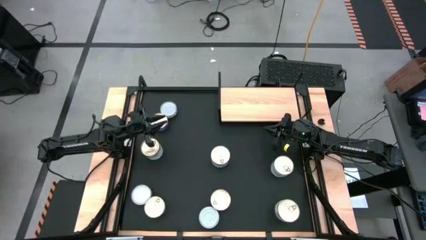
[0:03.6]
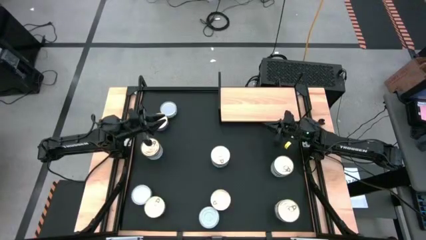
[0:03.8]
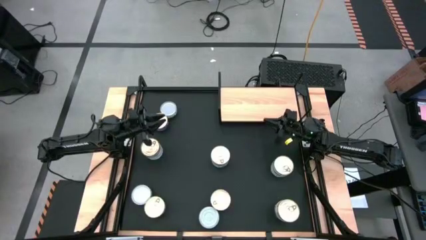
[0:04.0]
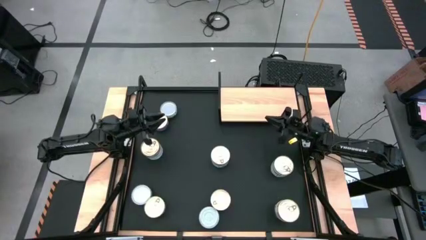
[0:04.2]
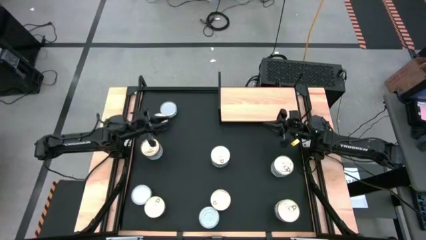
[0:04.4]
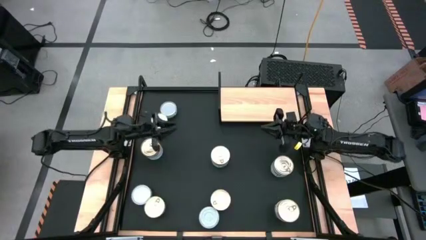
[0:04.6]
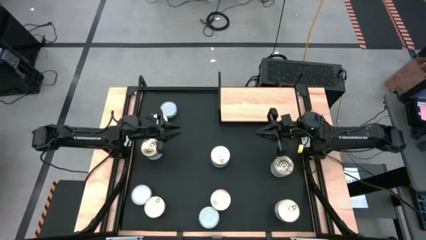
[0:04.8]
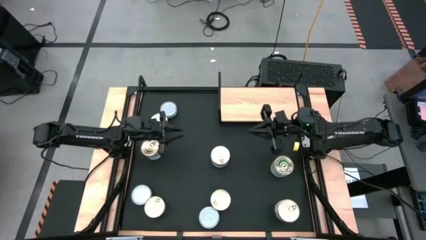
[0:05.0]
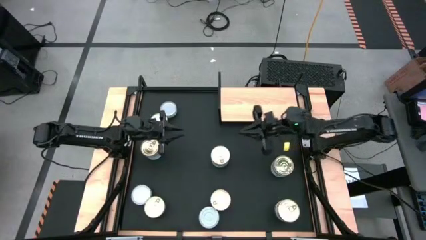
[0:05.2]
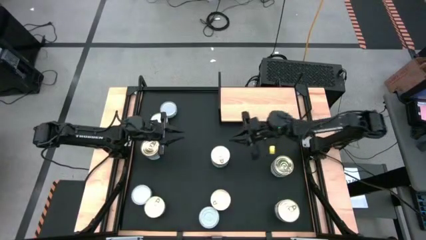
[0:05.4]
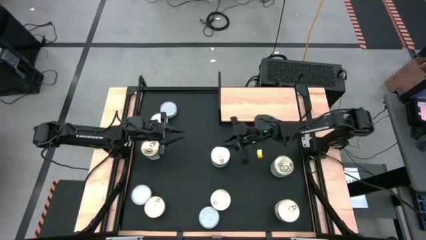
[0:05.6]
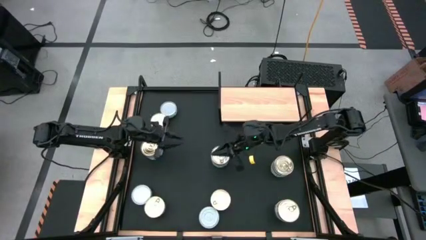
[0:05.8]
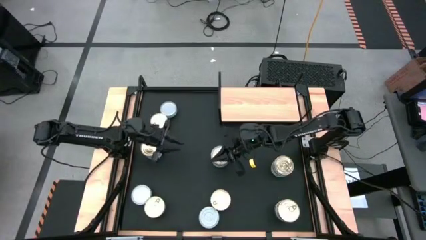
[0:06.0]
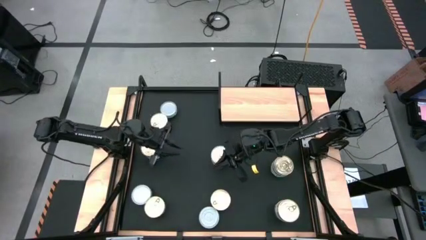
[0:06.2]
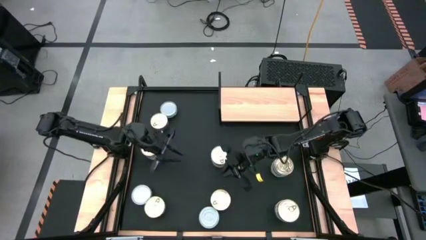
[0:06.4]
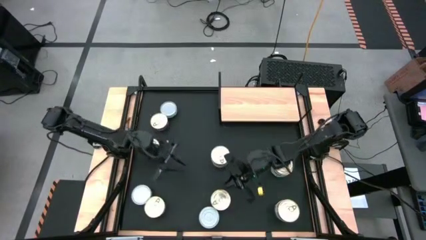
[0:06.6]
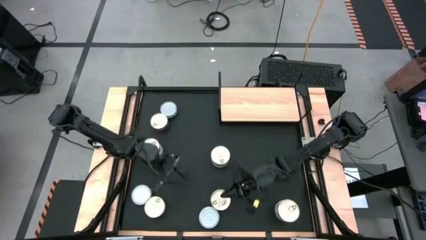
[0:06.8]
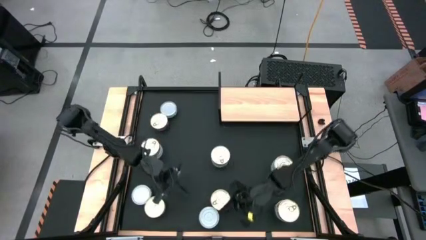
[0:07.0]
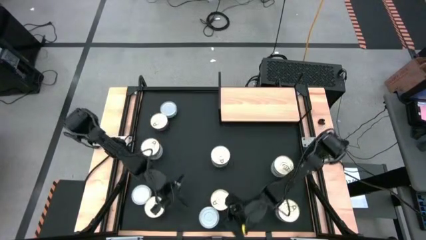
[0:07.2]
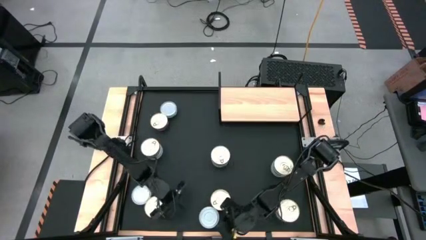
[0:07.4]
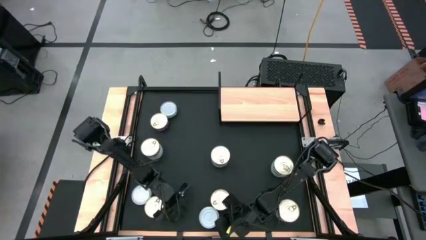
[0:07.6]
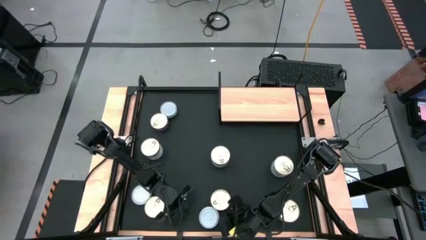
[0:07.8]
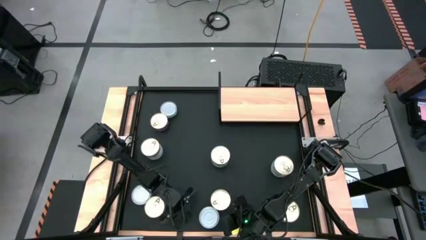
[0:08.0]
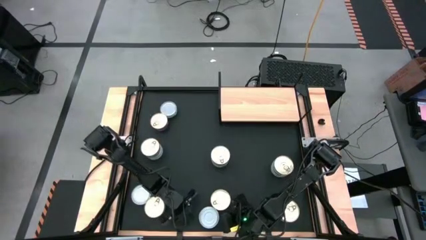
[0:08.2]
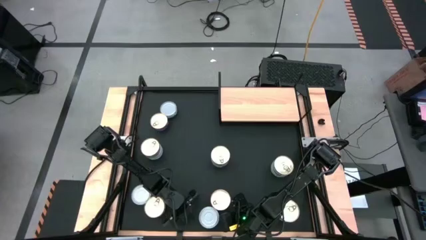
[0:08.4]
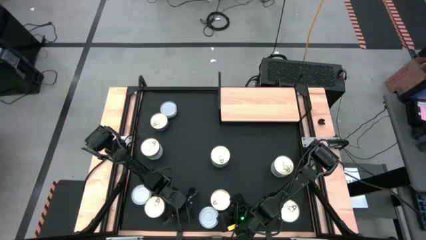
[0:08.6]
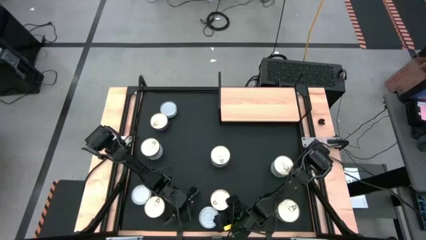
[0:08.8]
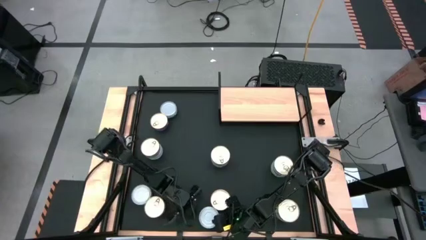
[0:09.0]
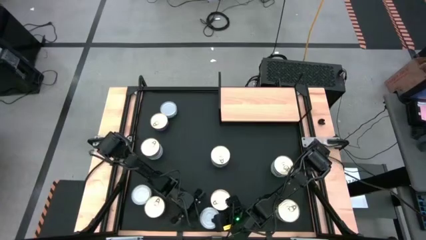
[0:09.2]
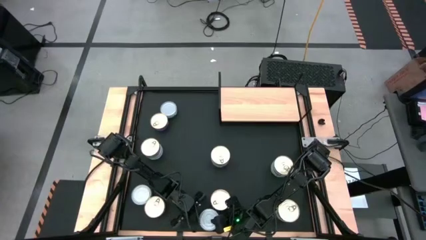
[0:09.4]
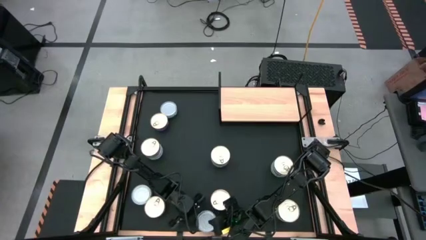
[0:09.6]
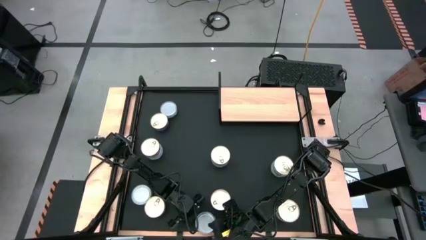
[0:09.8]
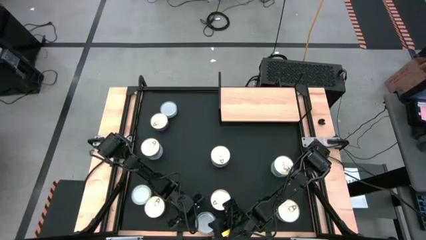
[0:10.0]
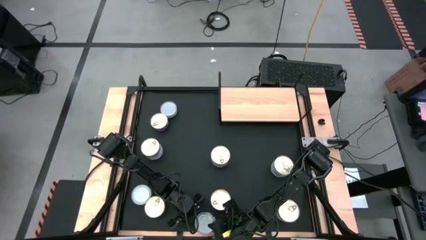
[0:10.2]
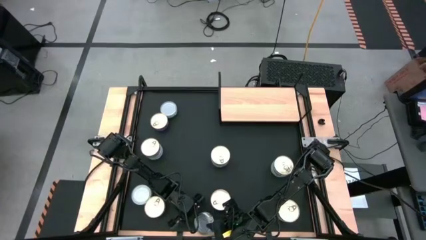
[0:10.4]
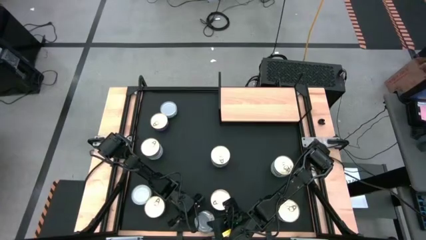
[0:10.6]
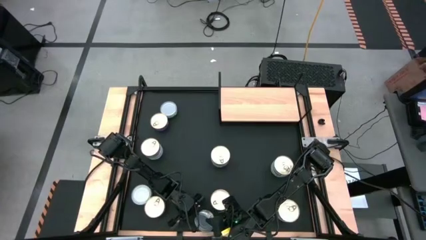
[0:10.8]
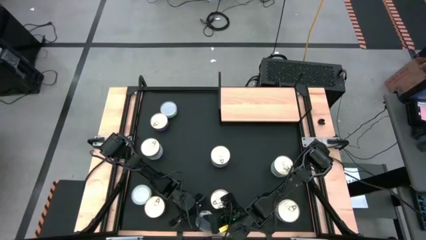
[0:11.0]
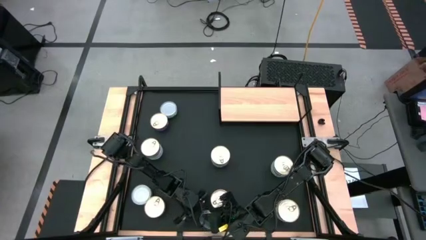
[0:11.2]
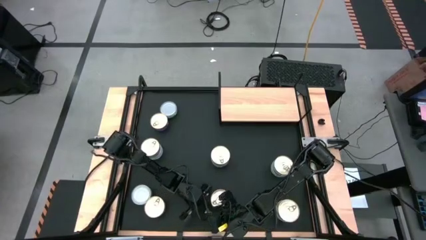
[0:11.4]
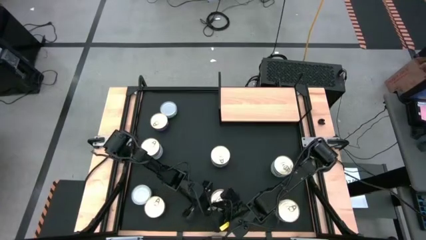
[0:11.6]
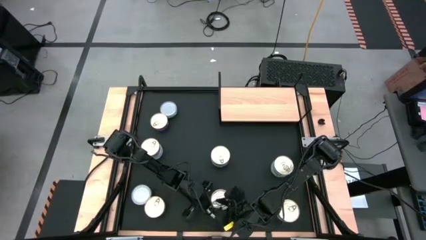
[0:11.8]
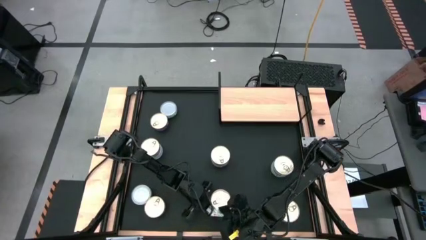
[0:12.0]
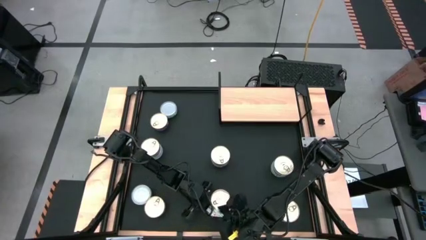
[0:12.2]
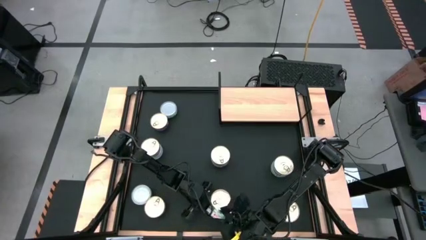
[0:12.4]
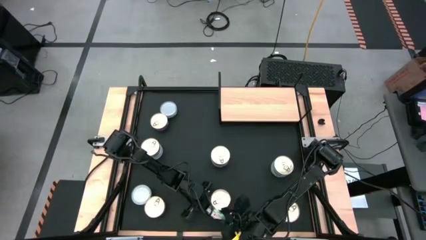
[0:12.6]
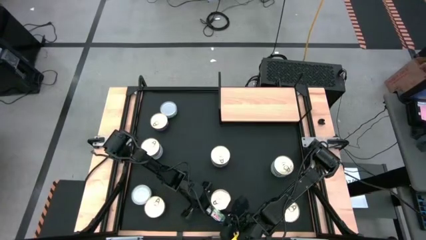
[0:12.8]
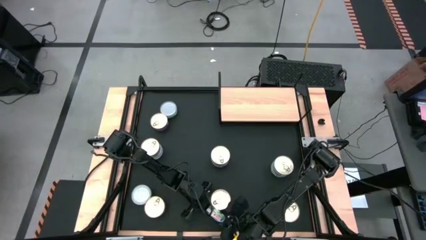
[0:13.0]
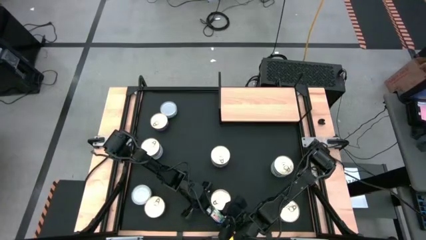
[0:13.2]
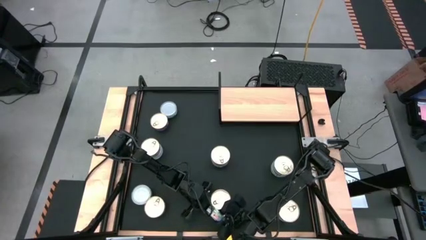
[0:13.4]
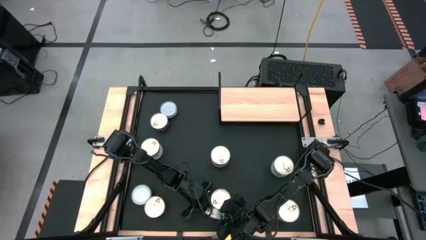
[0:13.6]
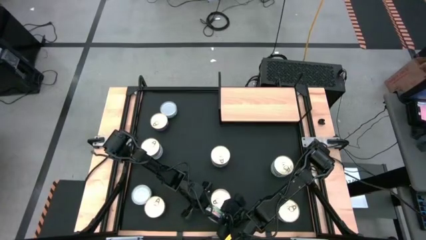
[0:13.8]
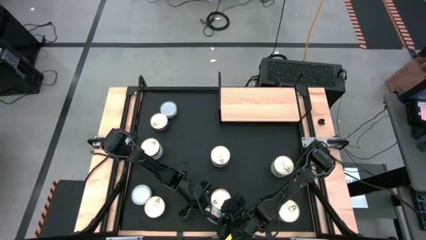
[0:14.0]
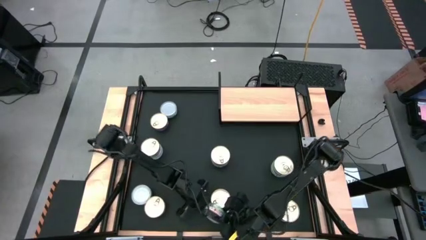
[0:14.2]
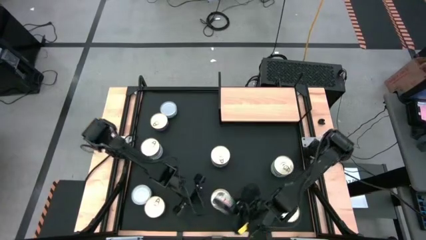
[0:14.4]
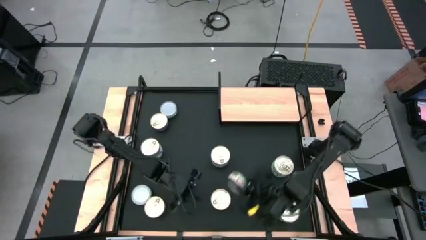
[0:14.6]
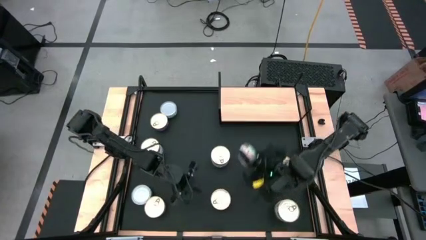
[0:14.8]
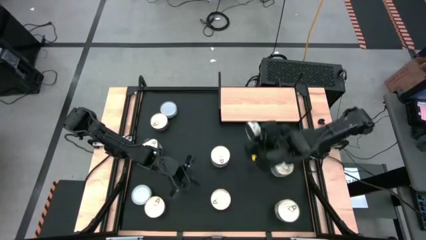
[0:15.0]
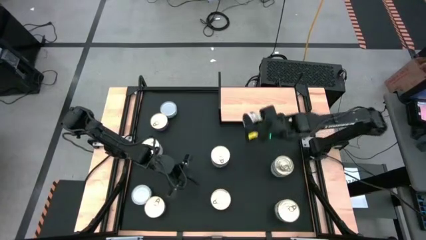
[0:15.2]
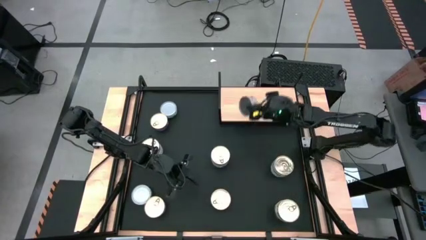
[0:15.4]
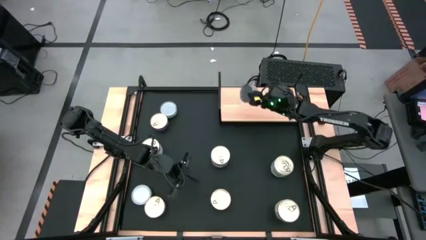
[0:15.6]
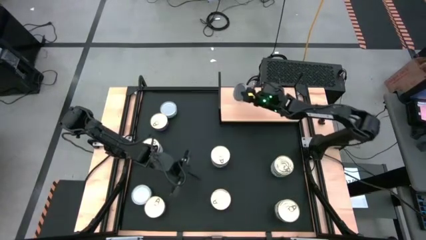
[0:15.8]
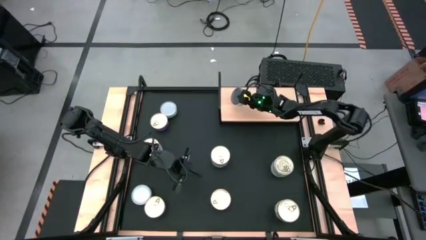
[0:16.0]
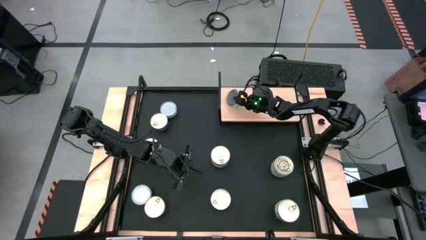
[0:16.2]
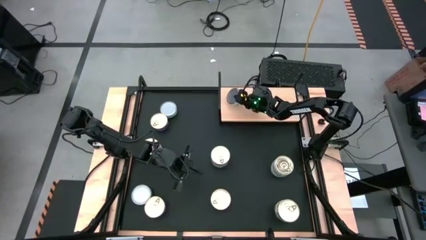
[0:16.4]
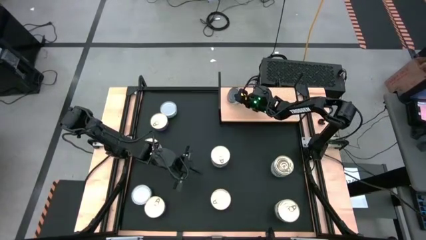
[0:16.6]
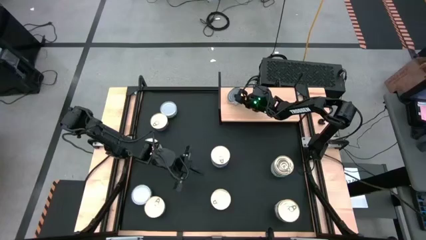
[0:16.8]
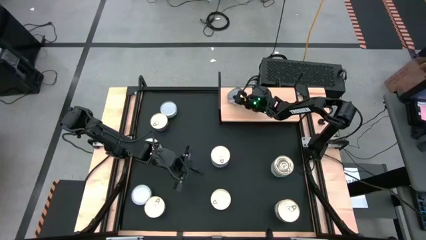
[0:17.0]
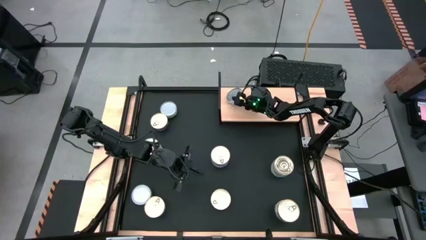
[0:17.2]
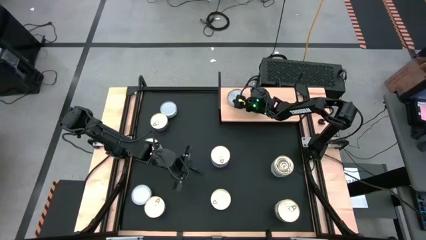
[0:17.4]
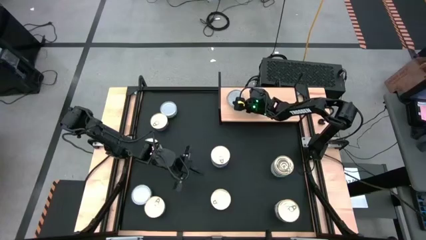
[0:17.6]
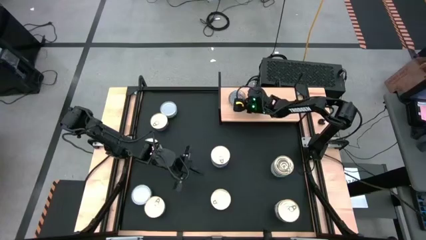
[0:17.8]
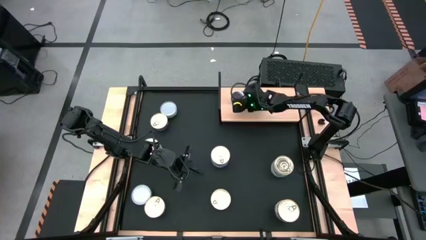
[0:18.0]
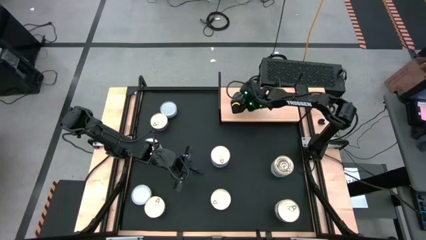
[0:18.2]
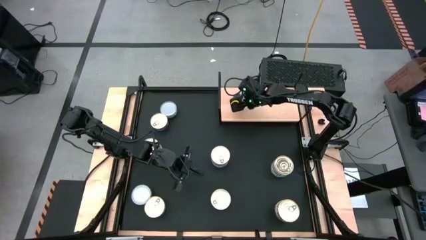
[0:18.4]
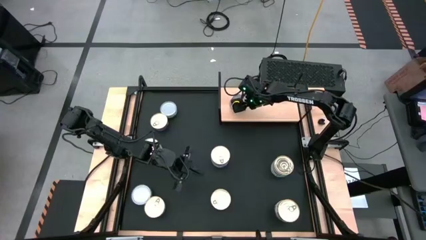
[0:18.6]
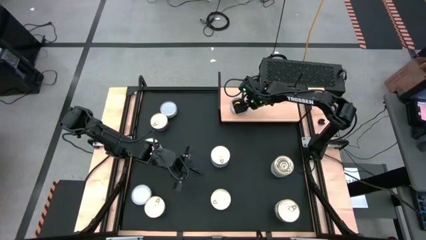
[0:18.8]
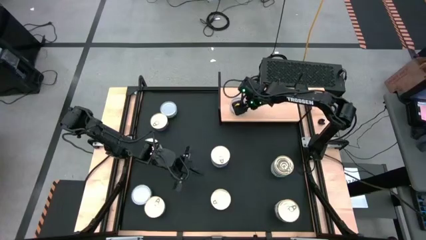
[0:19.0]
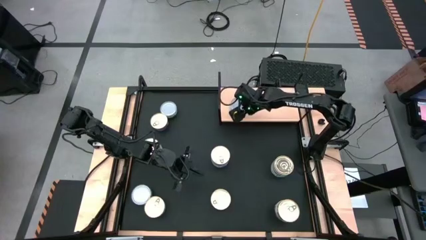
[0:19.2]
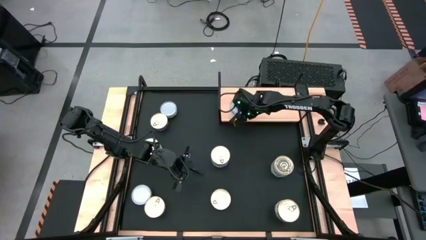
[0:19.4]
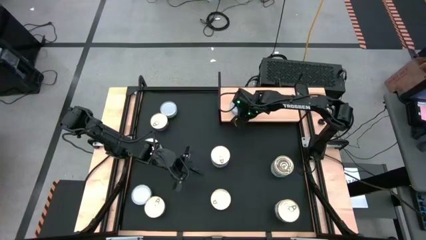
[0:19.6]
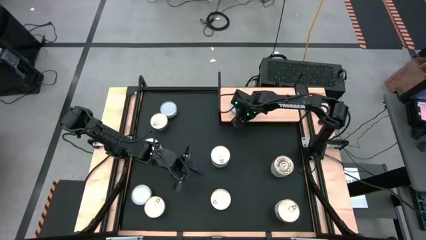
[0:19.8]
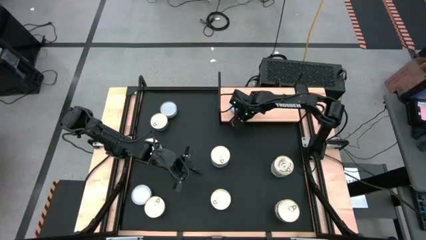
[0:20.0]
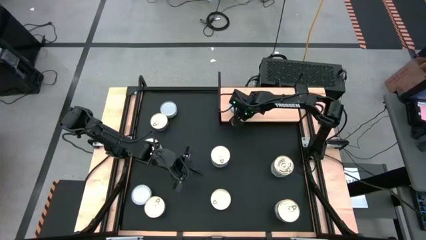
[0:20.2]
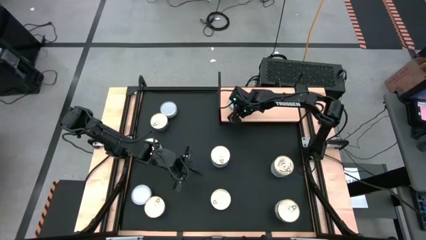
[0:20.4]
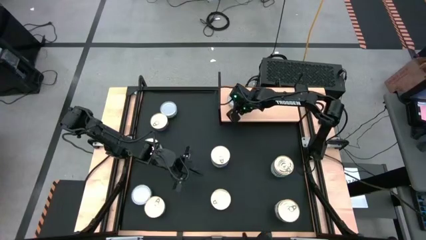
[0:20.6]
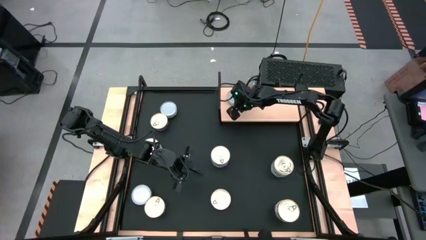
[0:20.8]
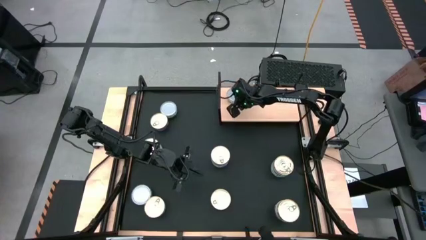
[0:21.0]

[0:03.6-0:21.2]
Task: Stack canned seafood by type on shelf
Put the green can on the shelf
